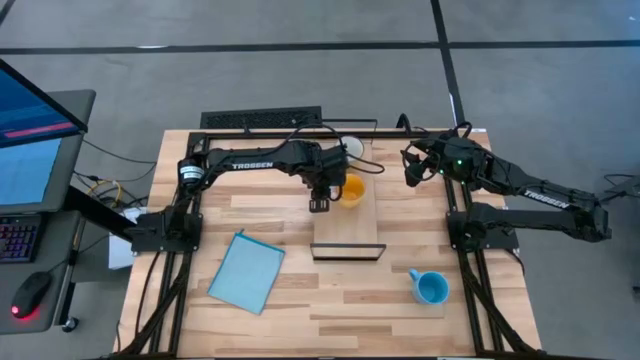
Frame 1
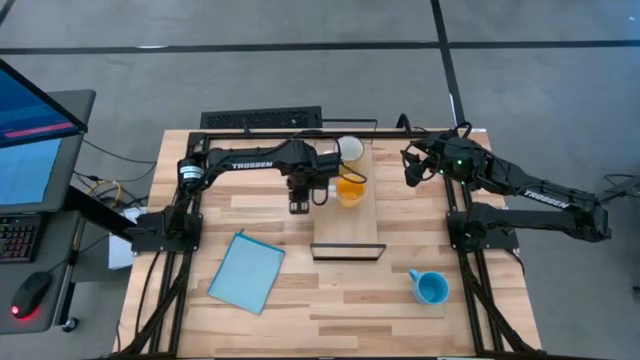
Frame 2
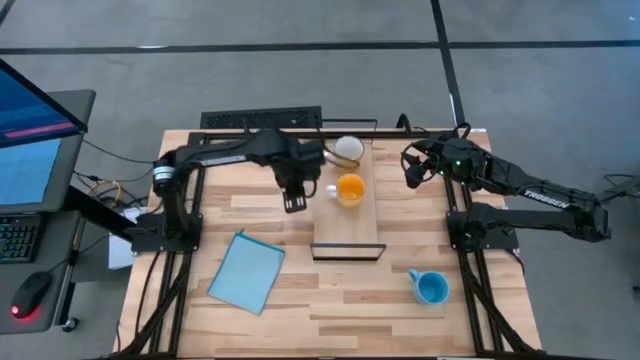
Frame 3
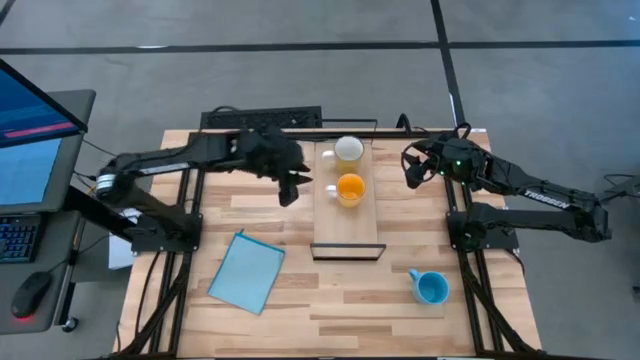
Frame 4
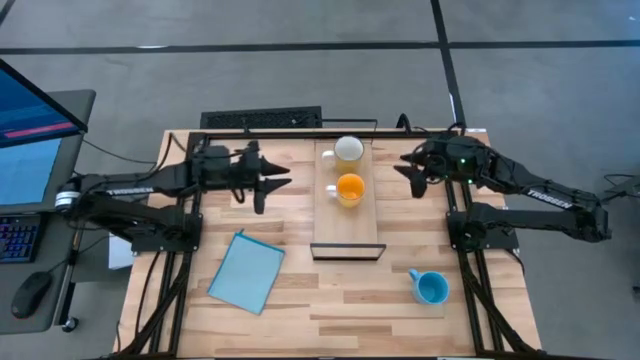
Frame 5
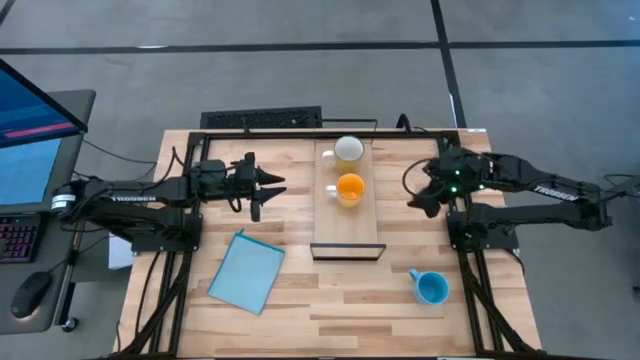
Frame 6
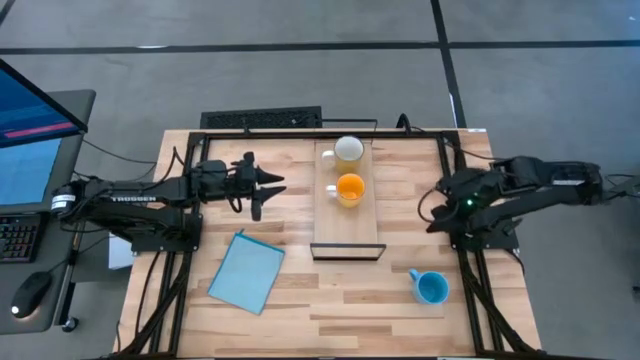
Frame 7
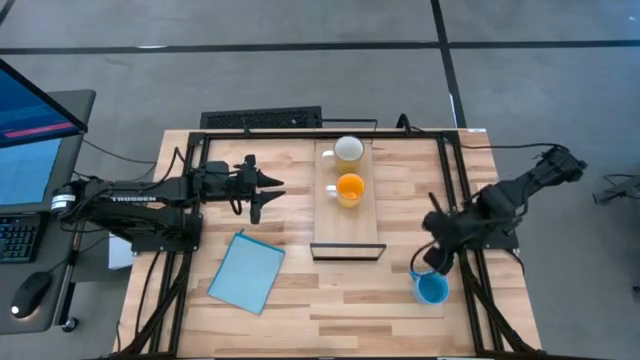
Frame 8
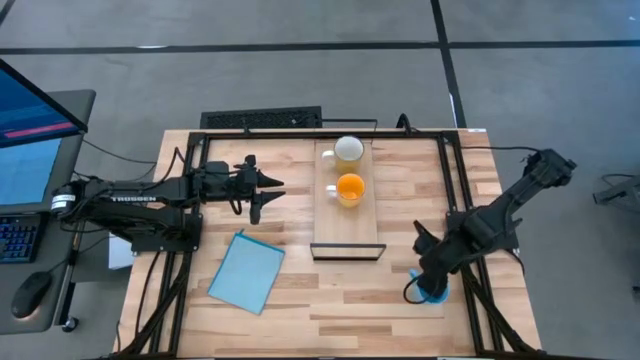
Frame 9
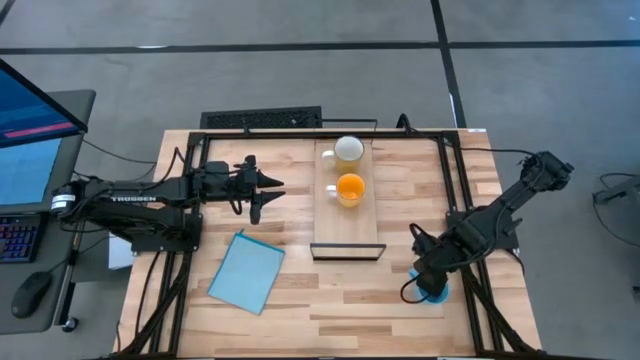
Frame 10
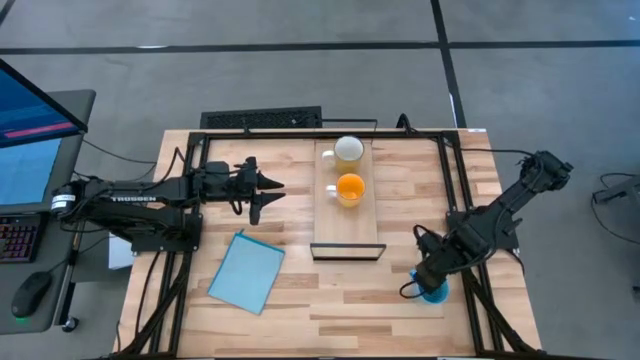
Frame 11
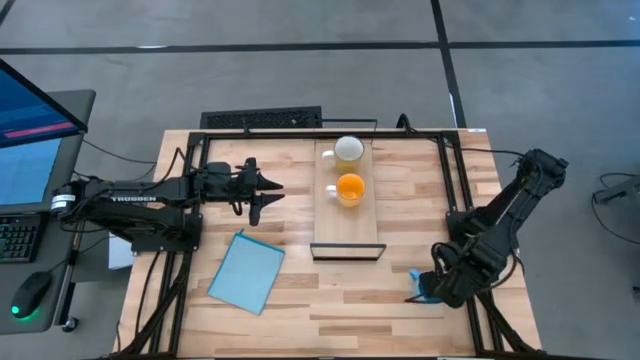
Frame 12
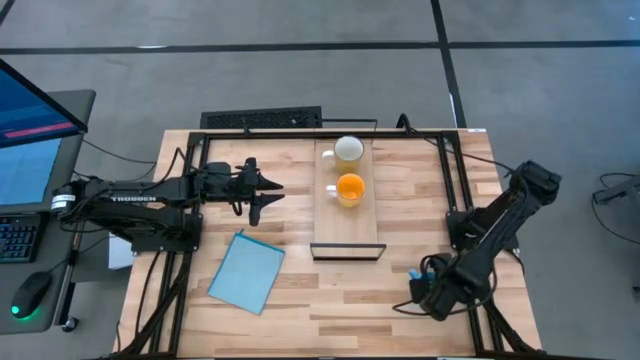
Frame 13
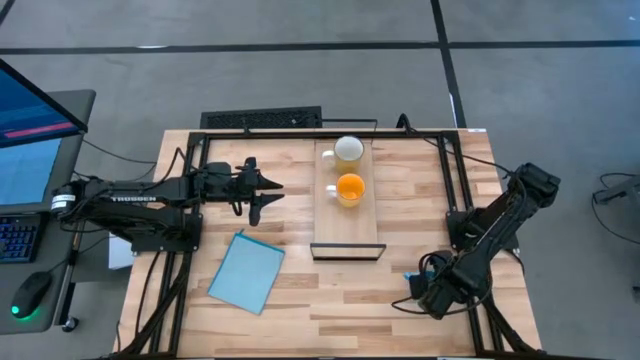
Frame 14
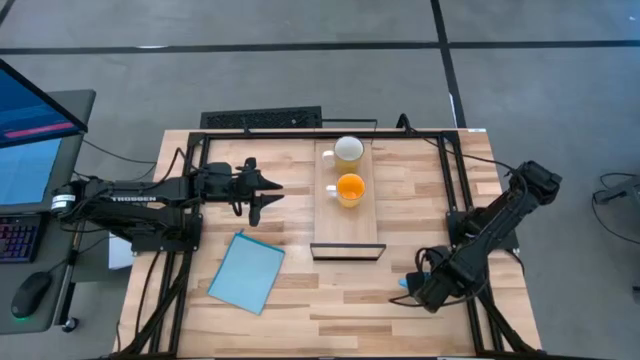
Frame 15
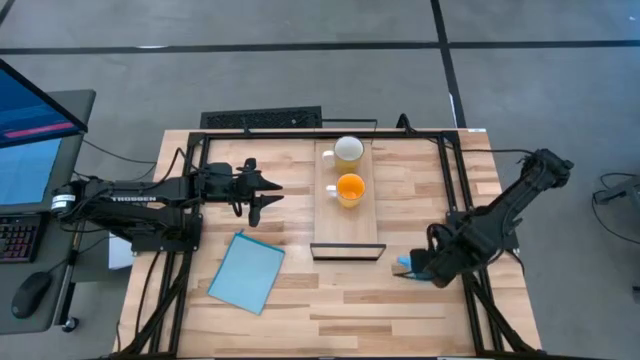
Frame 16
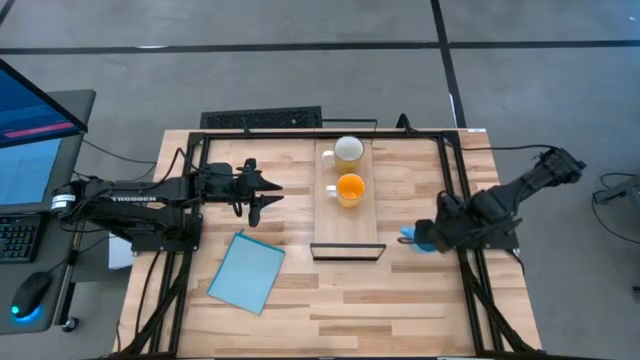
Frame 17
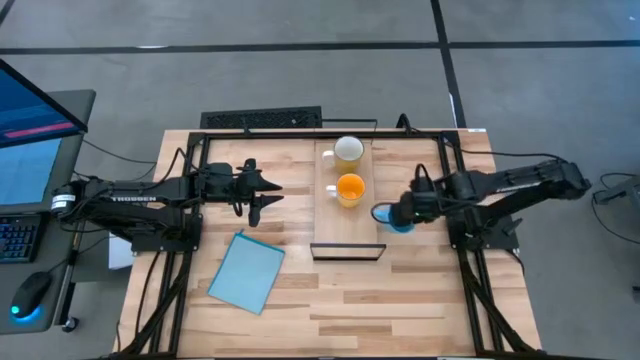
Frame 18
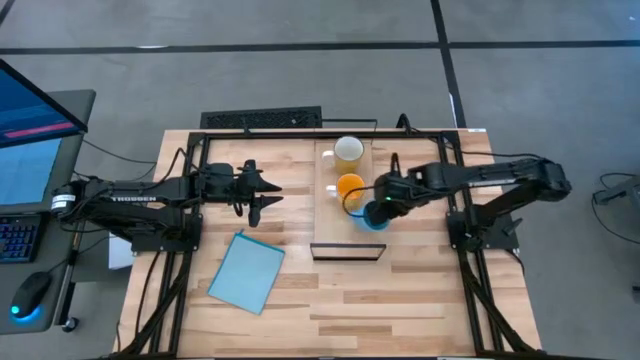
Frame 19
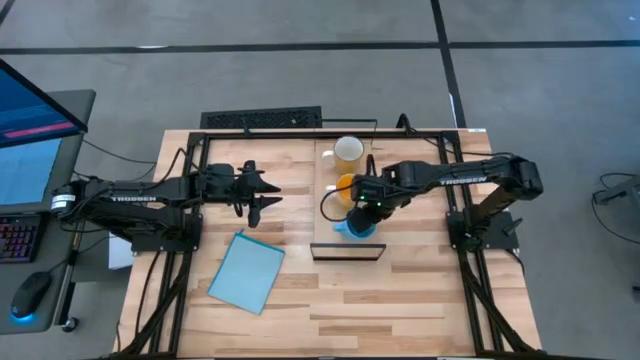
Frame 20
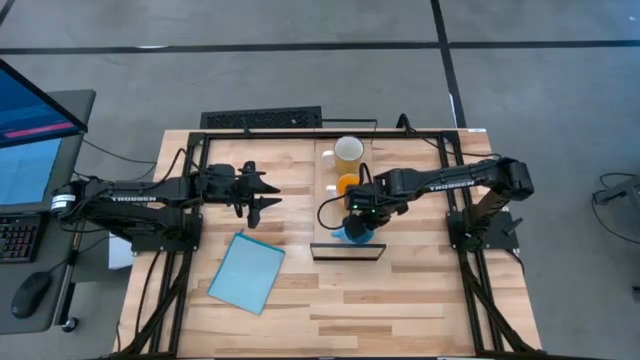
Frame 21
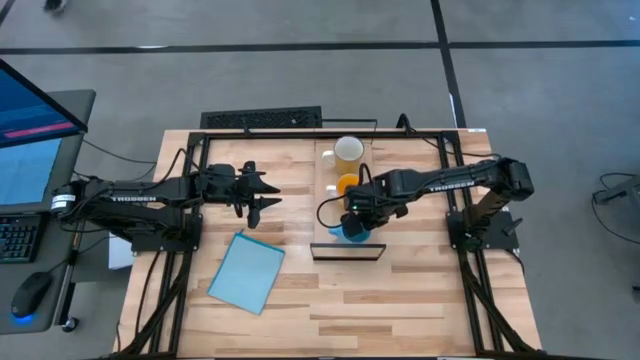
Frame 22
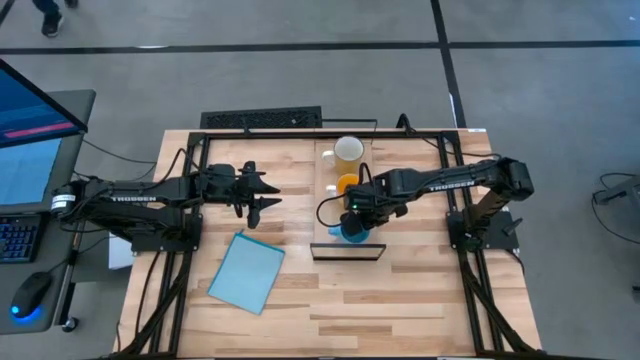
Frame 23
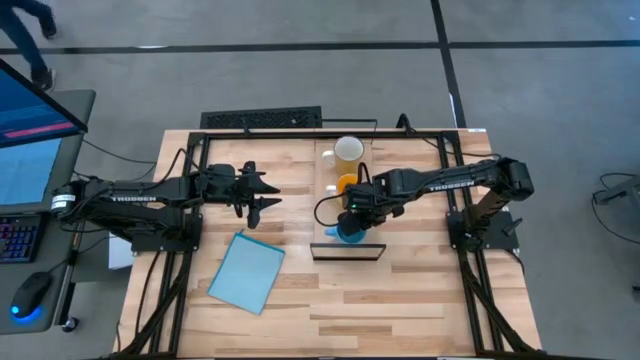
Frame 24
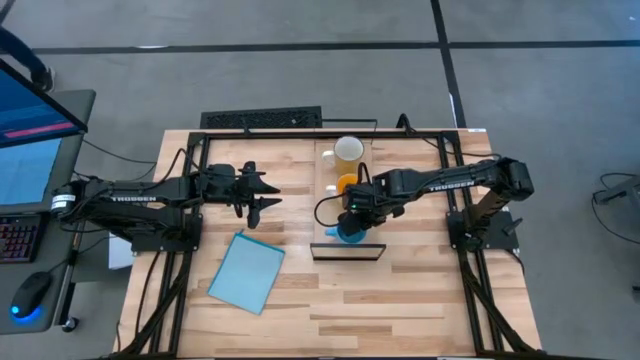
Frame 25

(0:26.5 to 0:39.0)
Task: Stack small to large cups/mugs on shelf
Put the blue mug on the shelf

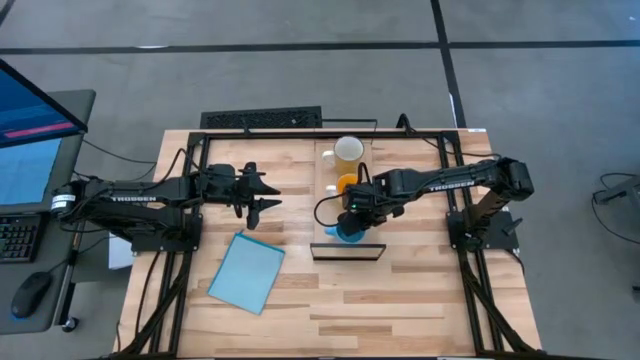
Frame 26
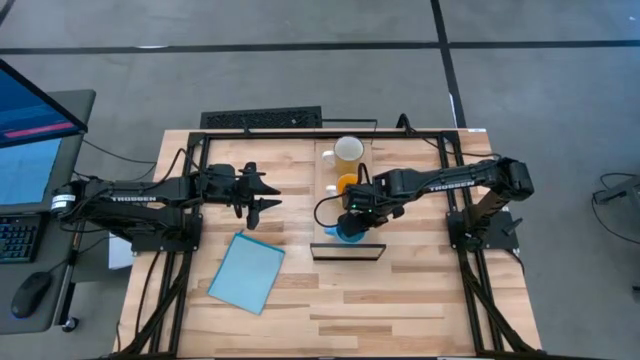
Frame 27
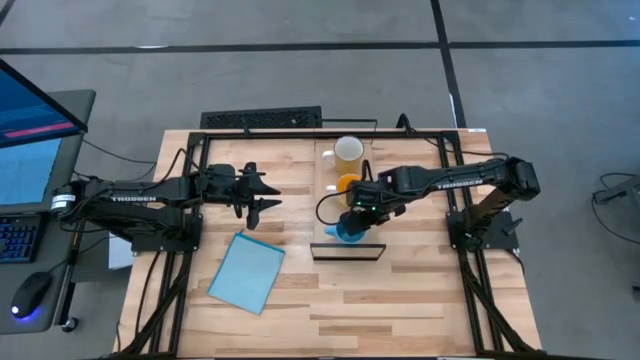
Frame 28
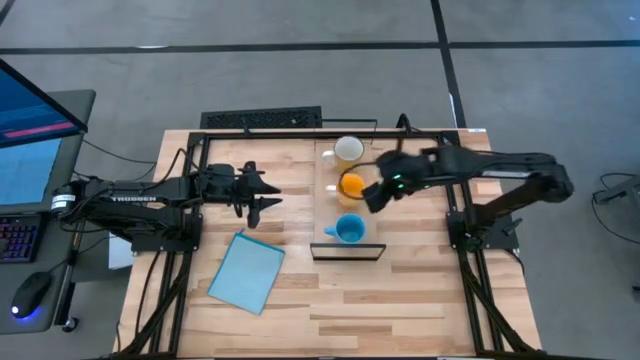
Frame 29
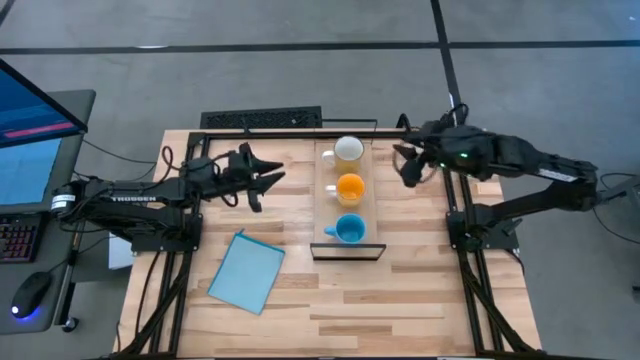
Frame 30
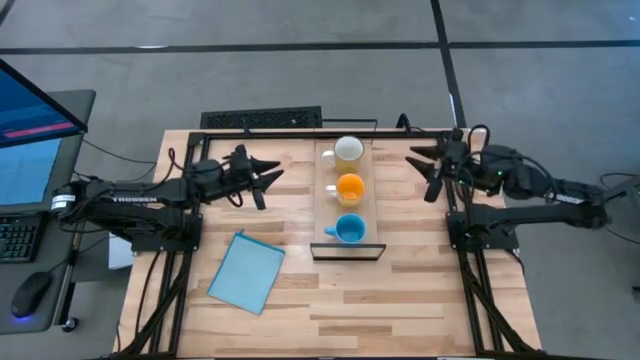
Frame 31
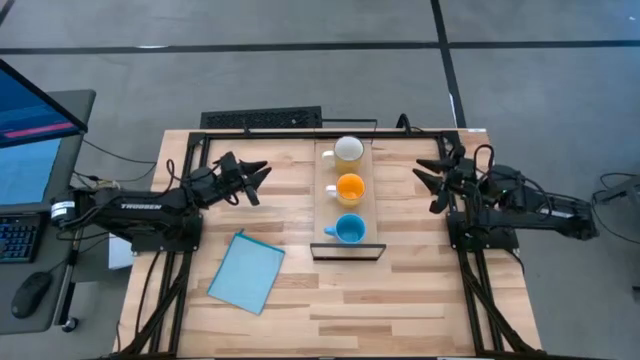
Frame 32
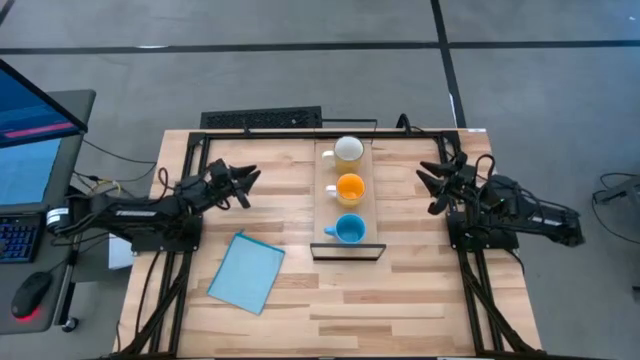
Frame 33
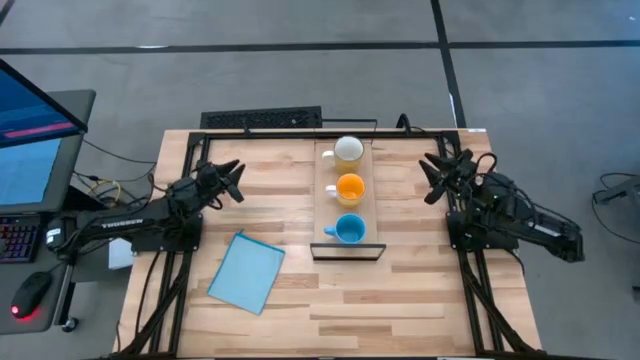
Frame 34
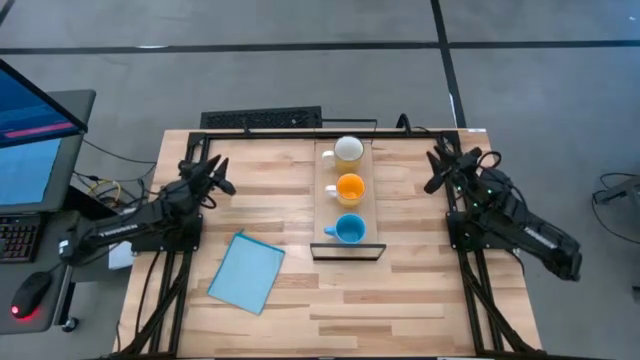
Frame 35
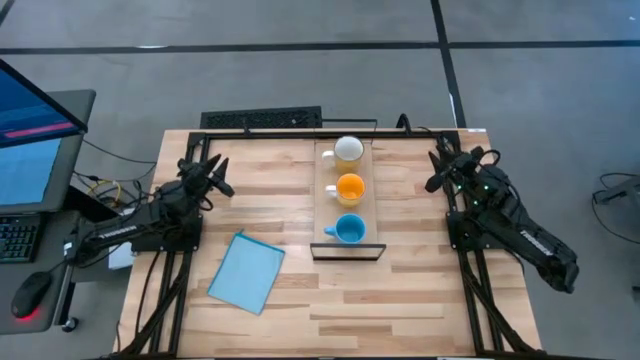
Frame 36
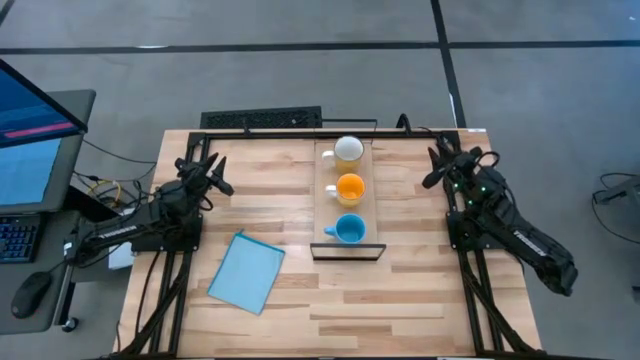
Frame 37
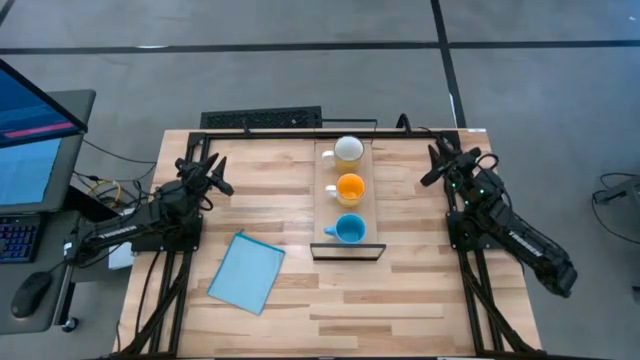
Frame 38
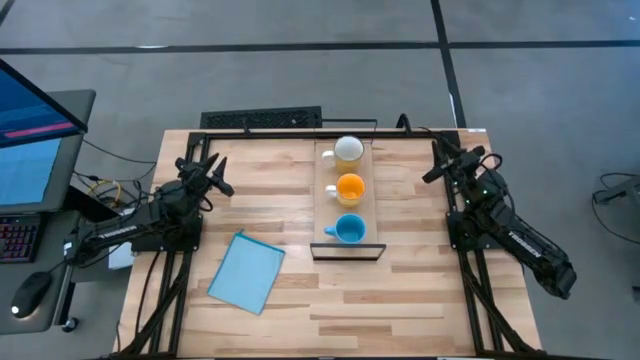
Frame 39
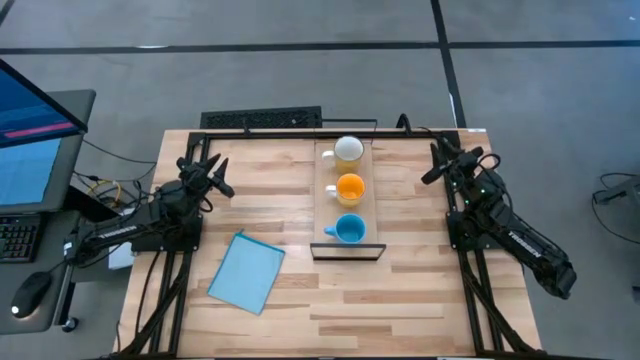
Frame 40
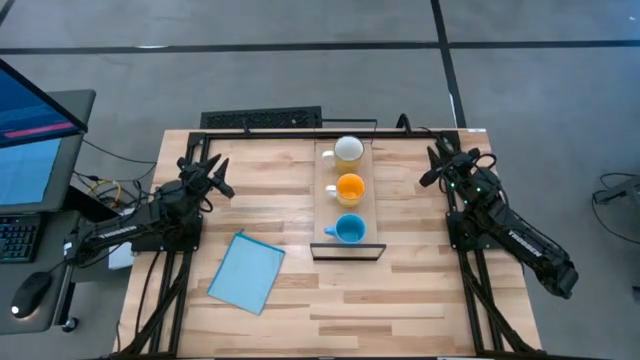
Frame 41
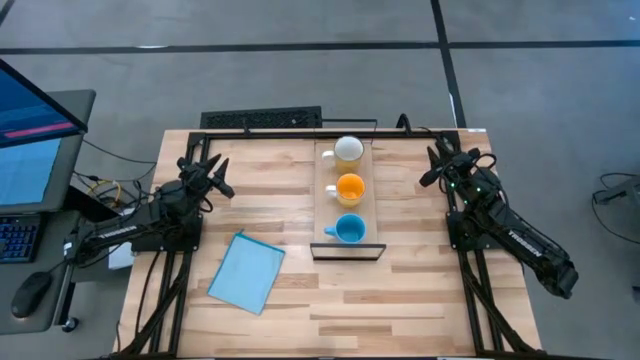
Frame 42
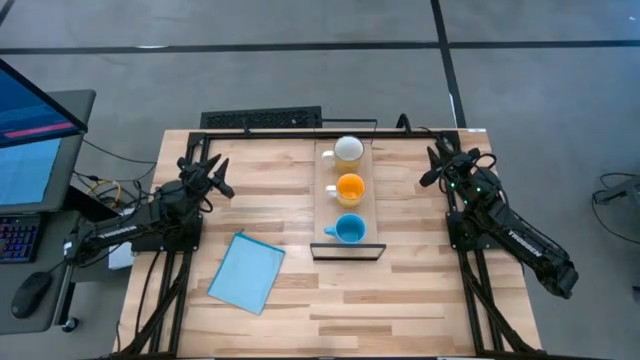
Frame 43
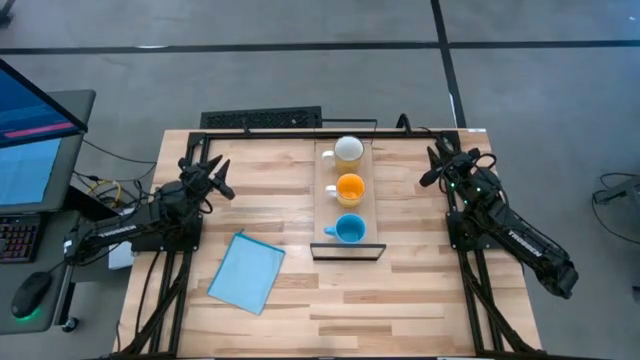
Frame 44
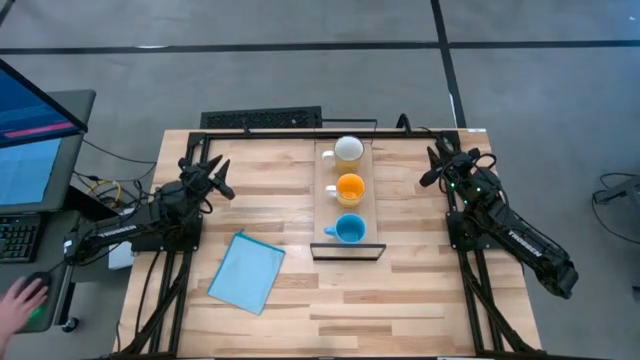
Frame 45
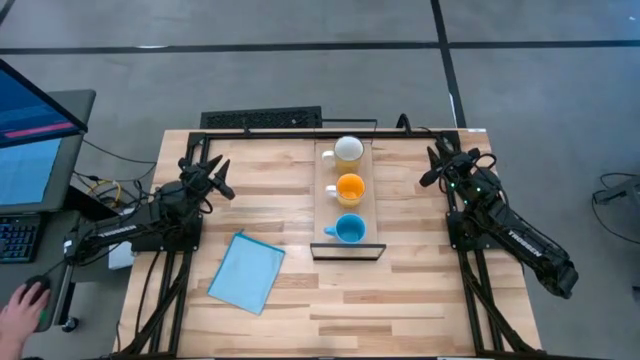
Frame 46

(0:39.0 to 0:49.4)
Return to Home Position
